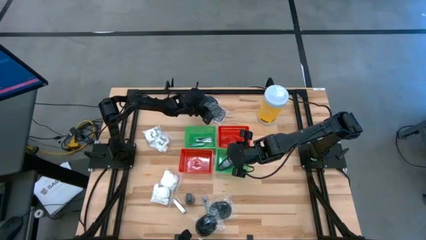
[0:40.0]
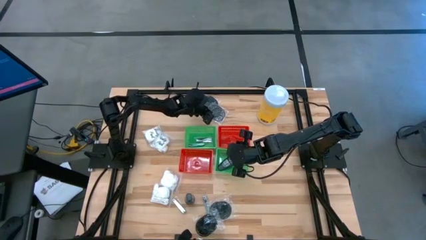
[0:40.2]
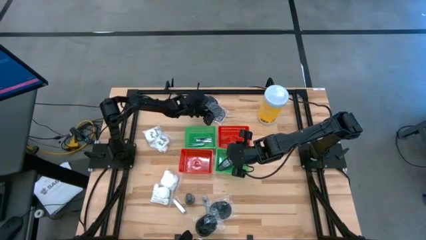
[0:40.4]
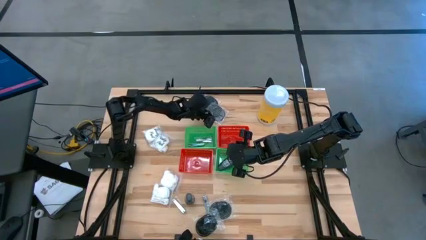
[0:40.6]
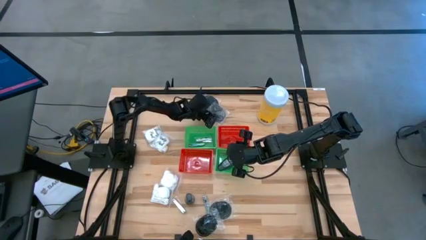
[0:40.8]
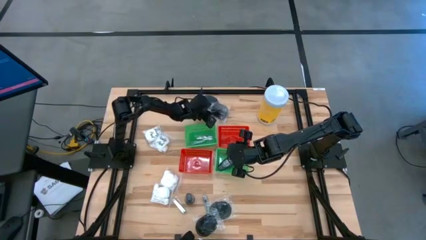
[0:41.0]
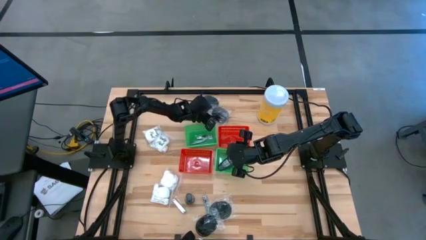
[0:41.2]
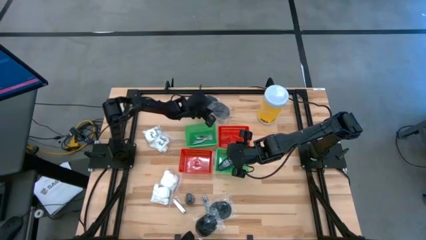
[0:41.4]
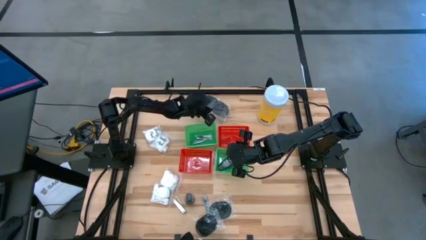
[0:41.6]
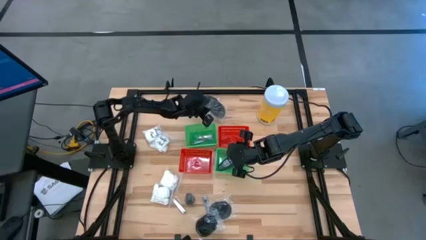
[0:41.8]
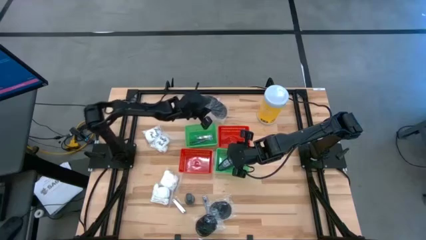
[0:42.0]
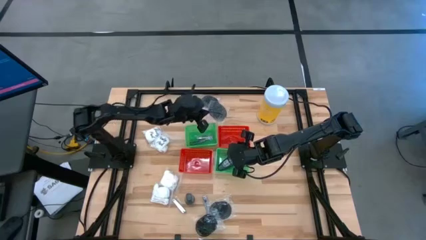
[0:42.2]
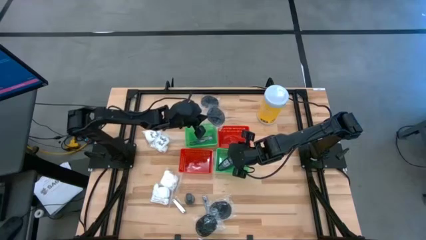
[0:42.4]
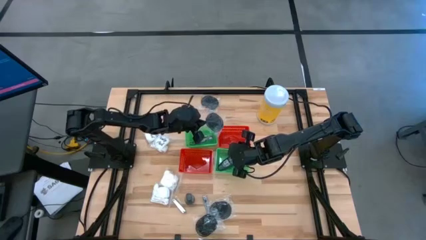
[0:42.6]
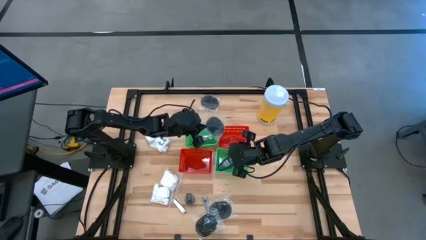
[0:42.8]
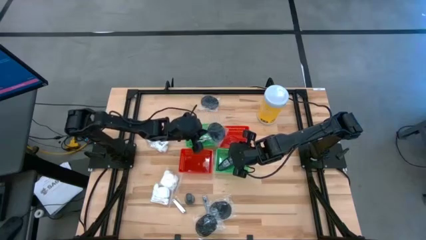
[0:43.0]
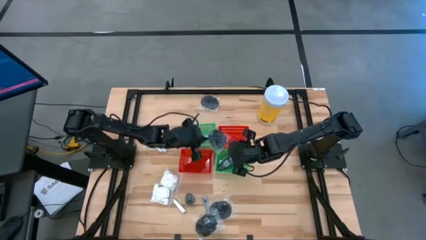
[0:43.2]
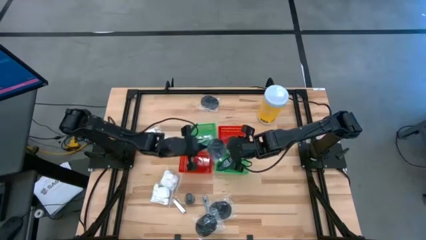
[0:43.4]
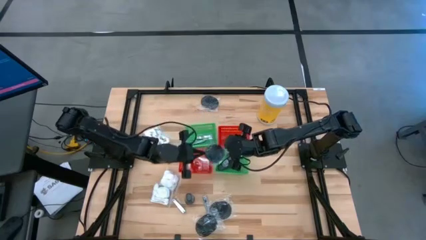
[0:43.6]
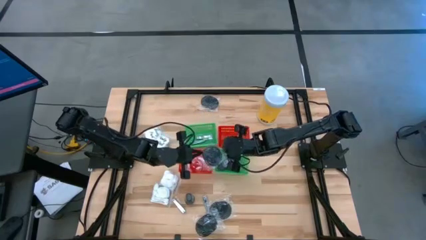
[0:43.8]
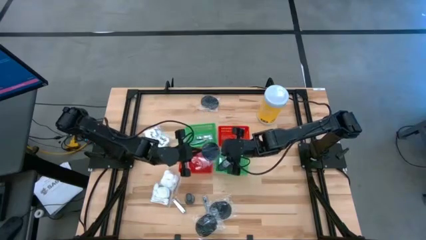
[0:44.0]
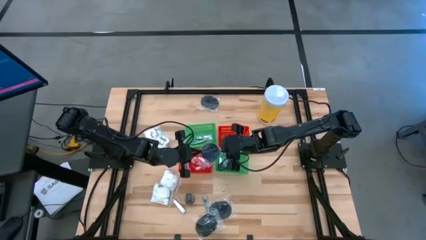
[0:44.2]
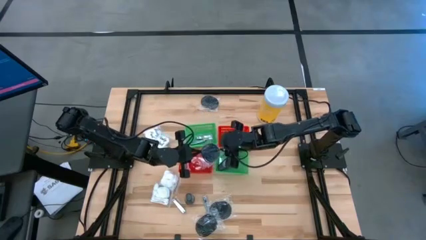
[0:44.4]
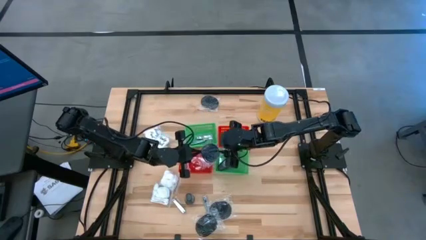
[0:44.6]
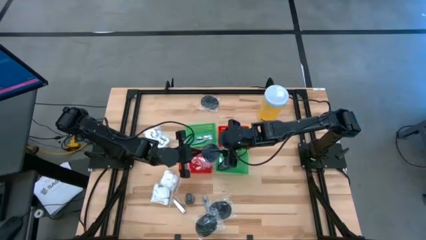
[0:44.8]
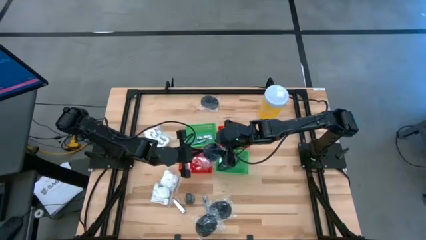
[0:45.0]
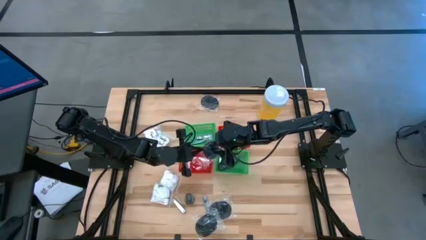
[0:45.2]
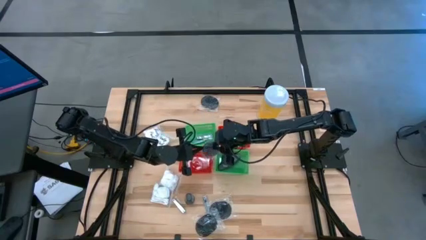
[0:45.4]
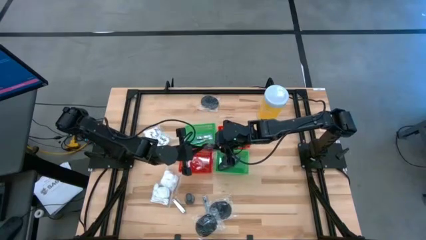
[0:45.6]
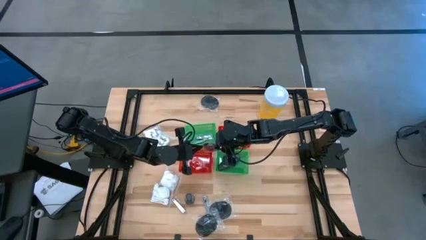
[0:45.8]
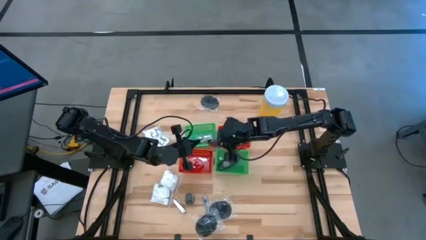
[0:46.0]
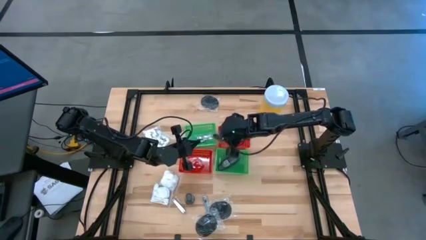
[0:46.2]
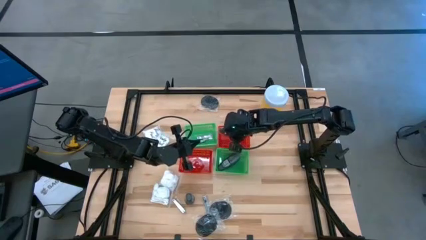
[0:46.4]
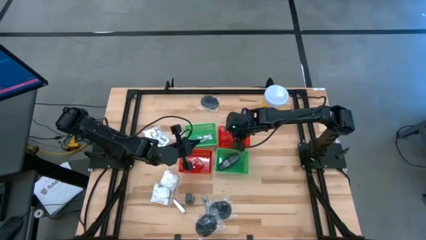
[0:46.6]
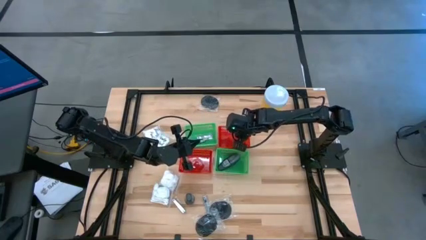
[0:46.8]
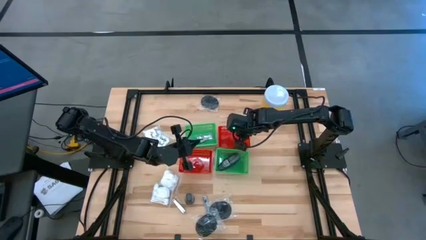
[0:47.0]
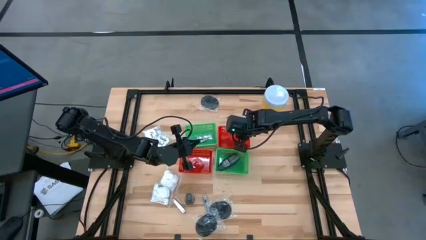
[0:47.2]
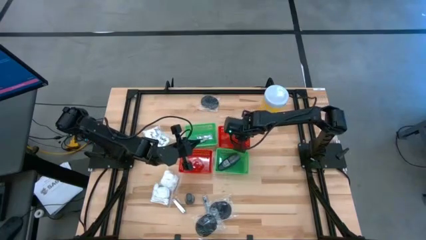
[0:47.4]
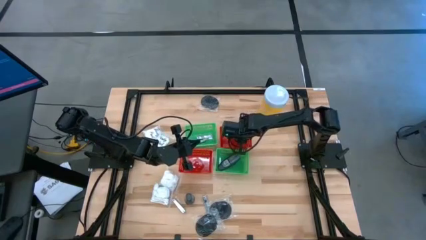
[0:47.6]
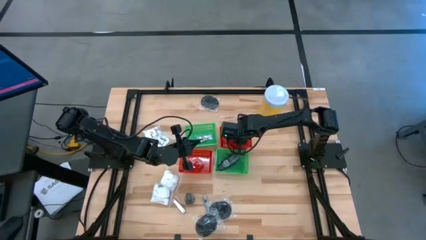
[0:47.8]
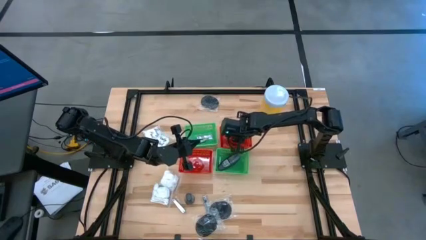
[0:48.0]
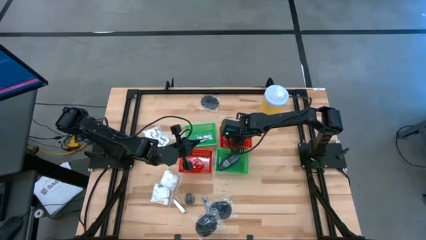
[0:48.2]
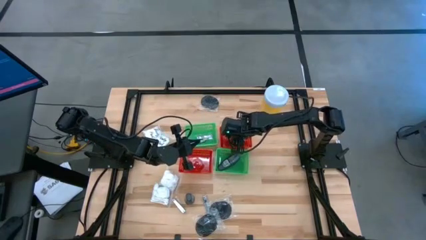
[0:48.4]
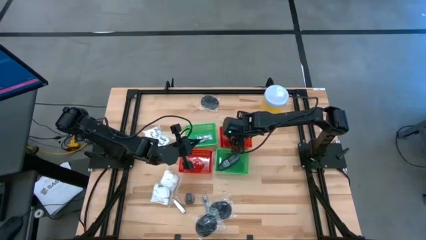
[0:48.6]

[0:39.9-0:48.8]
Task: Pick & Place Travel size toiletries
Put the black hairbrush into the right red basket

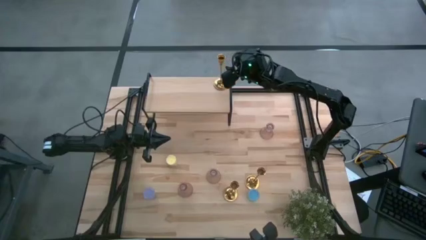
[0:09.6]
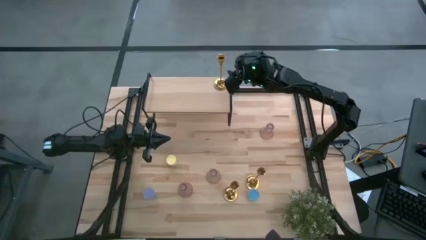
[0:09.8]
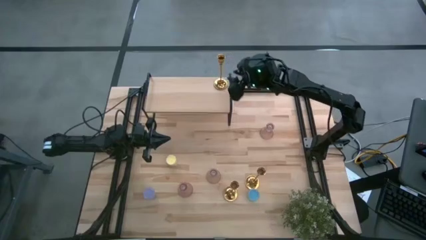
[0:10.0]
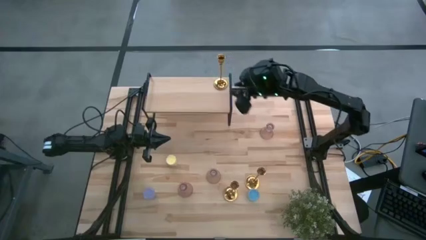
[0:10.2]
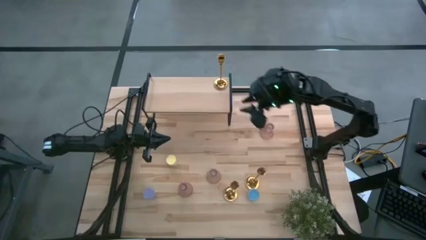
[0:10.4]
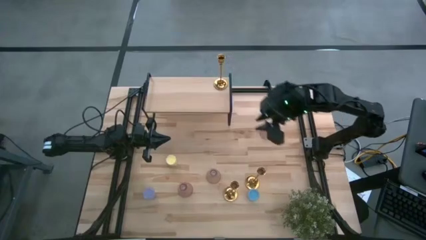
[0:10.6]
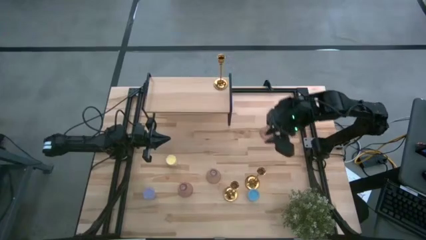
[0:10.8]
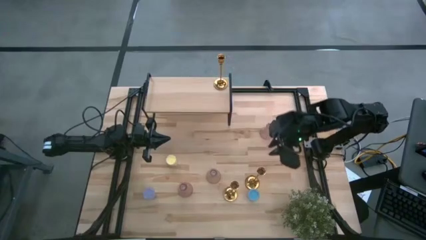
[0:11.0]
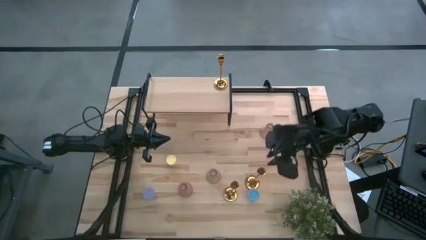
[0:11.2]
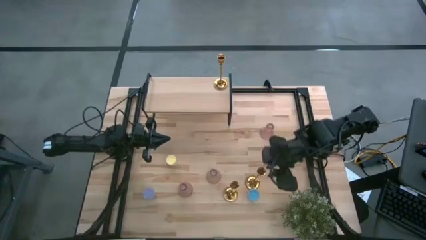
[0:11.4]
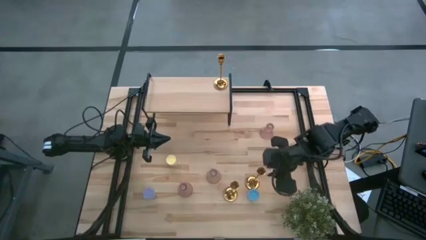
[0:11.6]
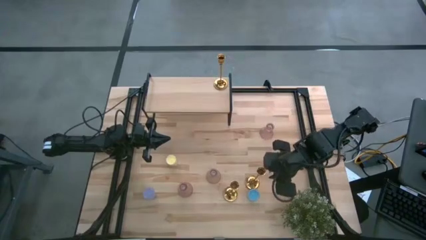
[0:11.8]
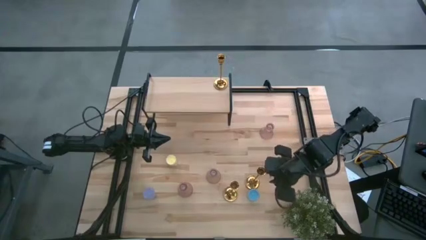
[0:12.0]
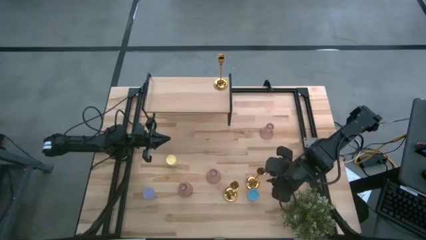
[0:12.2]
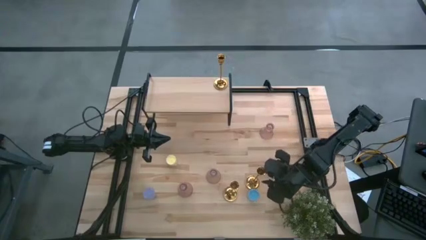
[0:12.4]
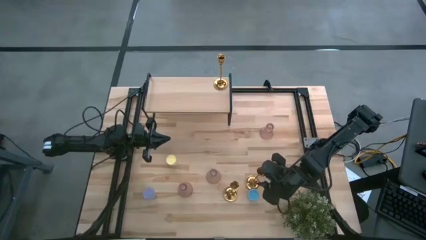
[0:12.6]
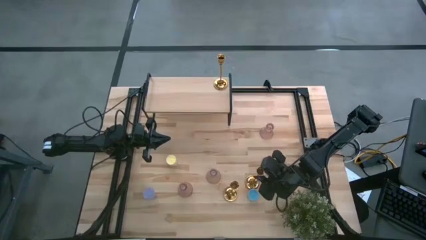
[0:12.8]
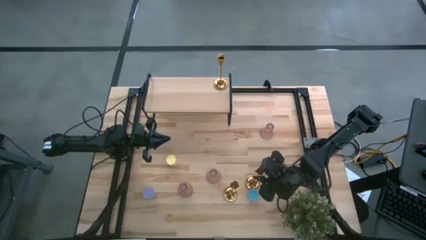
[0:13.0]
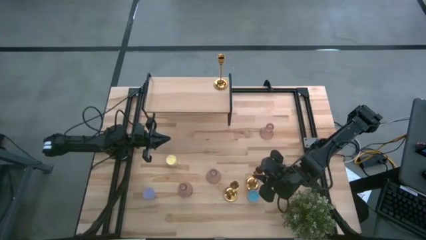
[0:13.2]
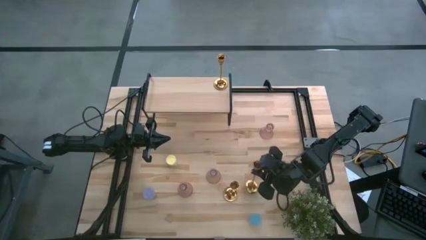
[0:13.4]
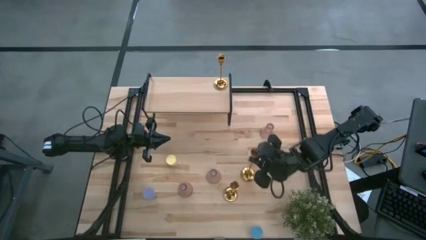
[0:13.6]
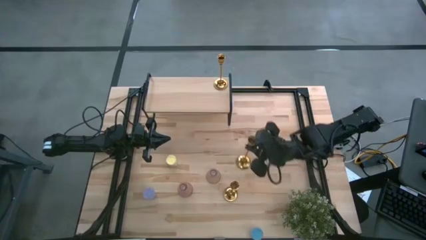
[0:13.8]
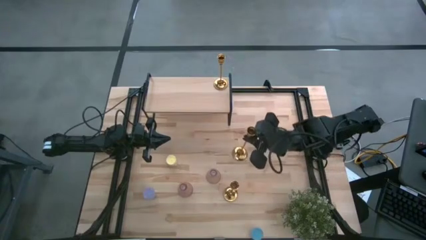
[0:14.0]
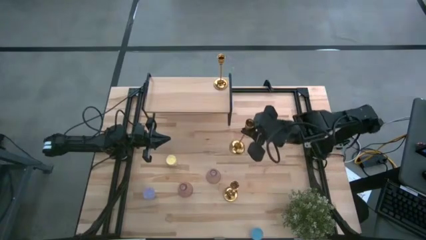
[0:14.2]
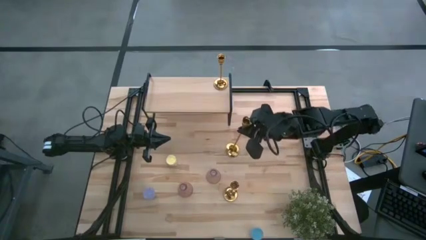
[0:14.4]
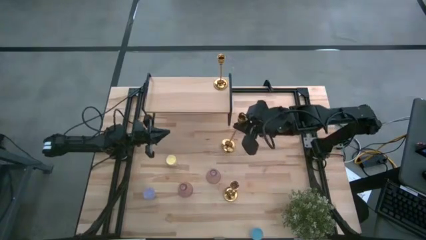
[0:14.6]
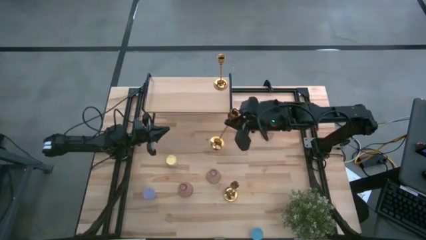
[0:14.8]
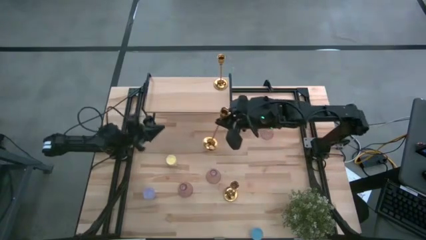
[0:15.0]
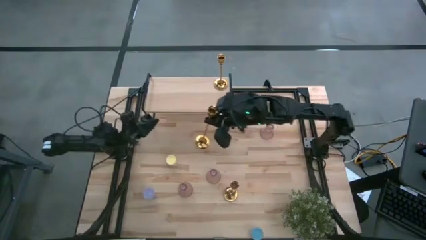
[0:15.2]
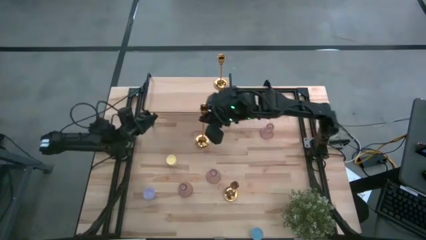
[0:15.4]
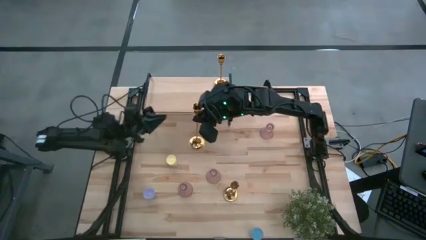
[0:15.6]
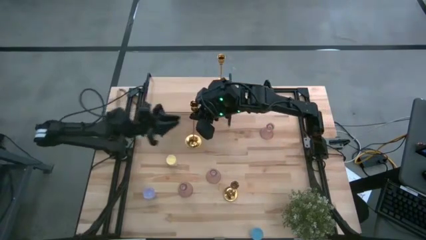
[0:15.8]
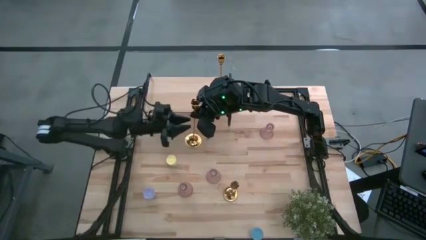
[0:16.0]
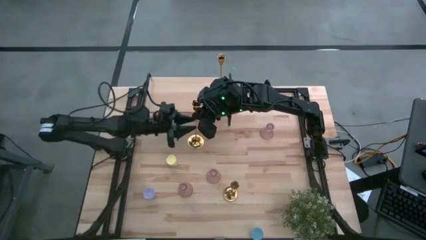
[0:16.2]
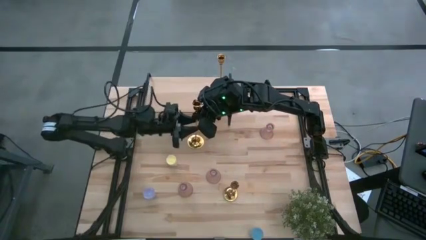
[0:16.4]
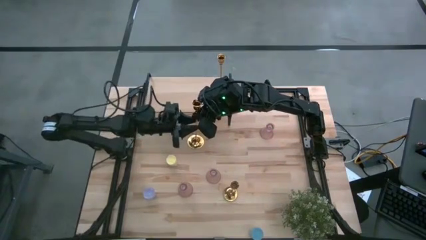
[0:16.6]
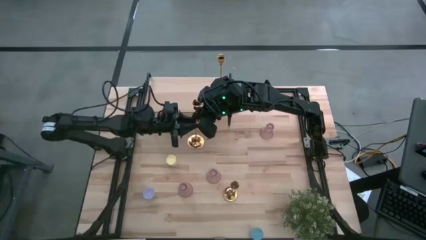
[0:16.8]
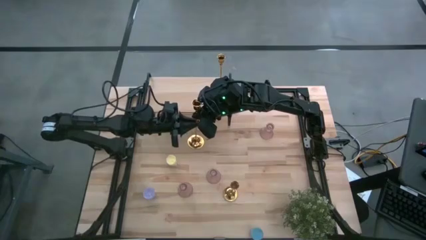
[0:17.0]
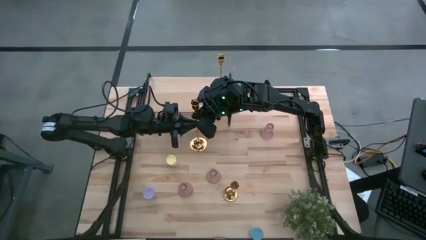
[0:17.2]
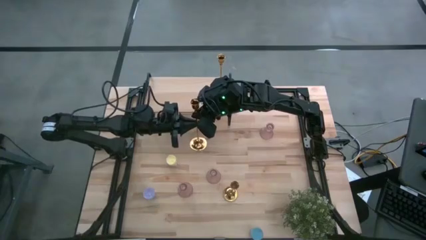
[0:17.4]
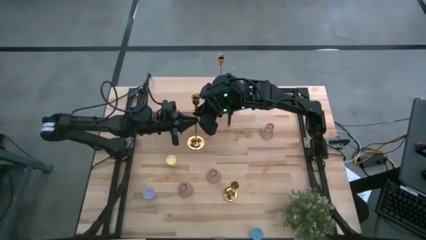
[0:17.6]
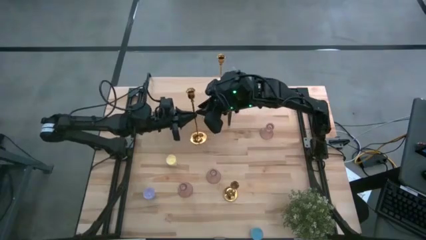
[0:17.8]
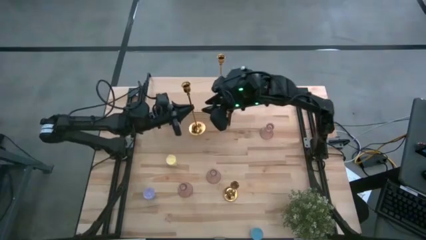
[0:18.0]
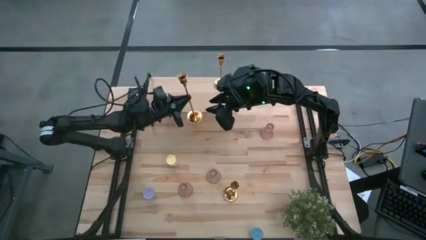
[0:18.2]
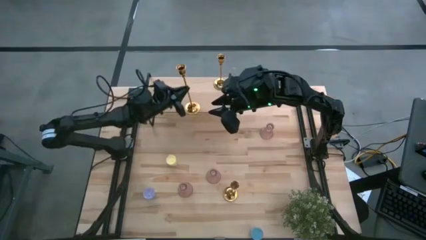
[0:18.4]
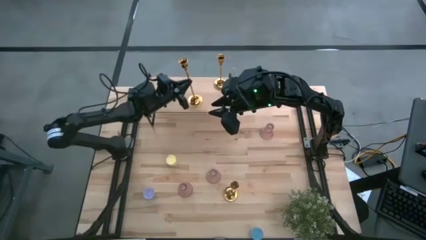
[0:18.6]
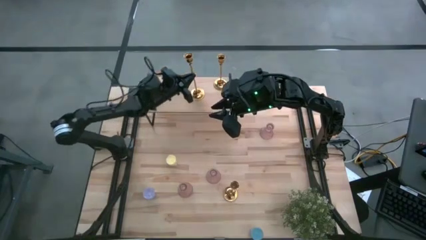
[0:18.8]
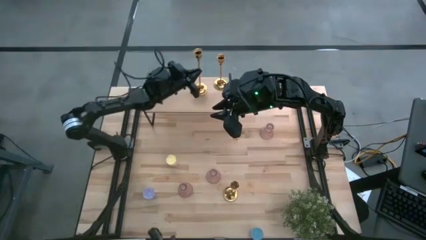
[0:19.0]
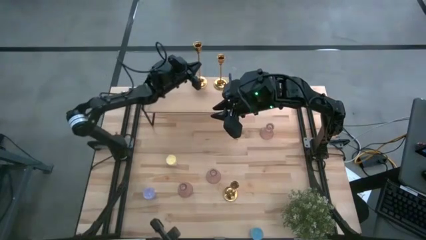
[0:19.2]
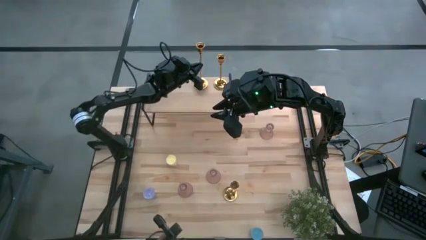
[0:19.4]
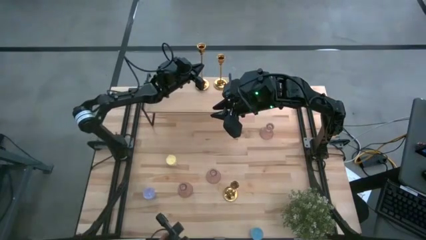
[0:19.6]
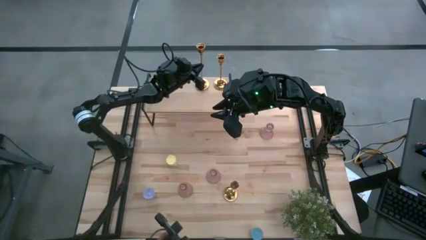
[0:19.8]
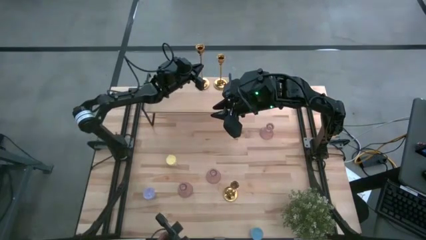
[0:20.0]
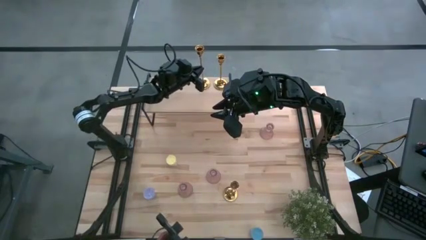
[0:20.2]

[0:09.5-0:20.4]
Task: Pick & Place candle stick holders
Put the right gold candle holder on the shelf aligned with the gold candle holder
